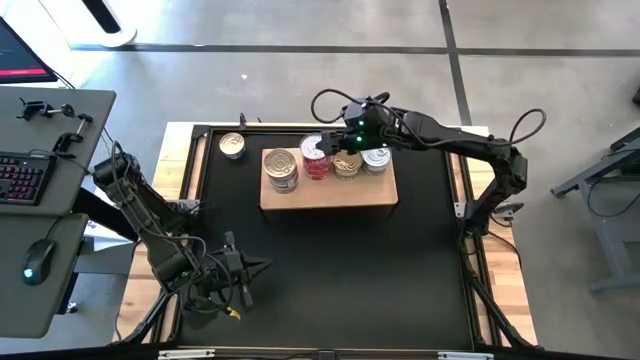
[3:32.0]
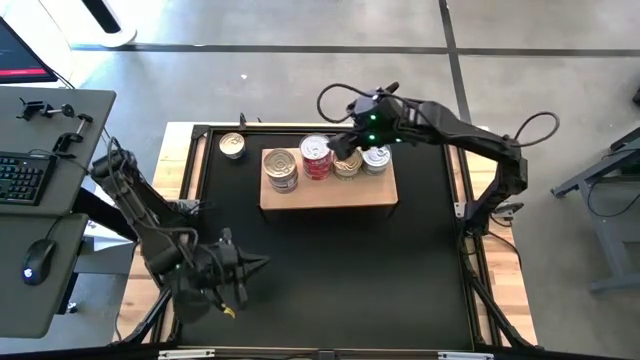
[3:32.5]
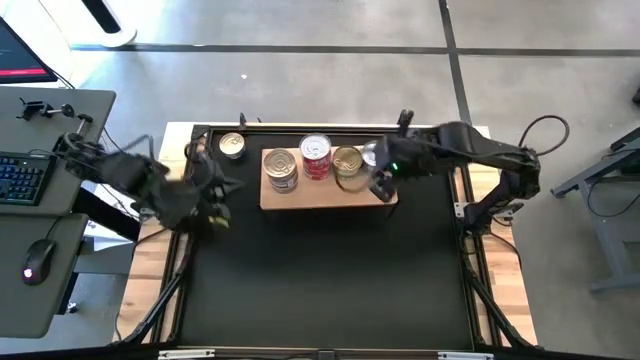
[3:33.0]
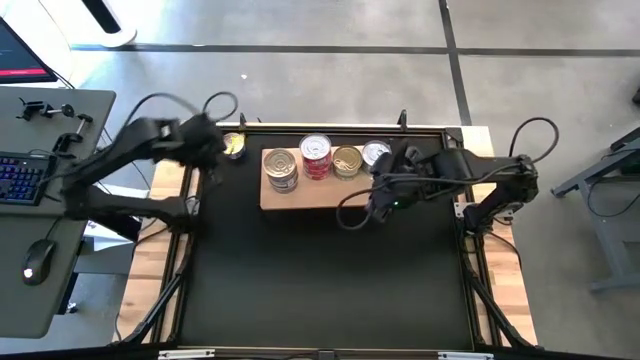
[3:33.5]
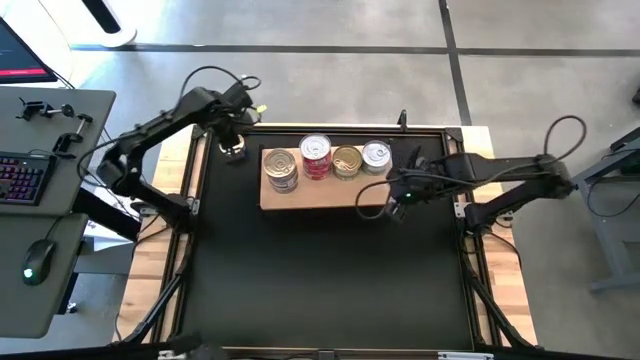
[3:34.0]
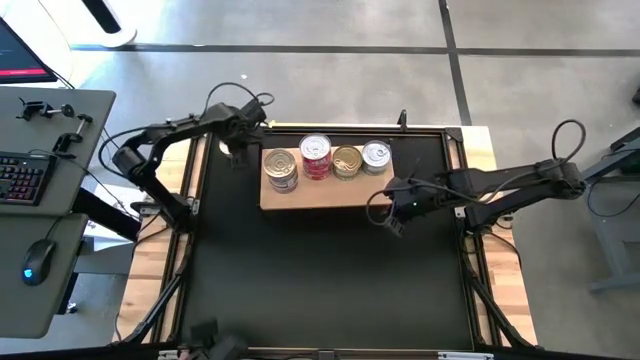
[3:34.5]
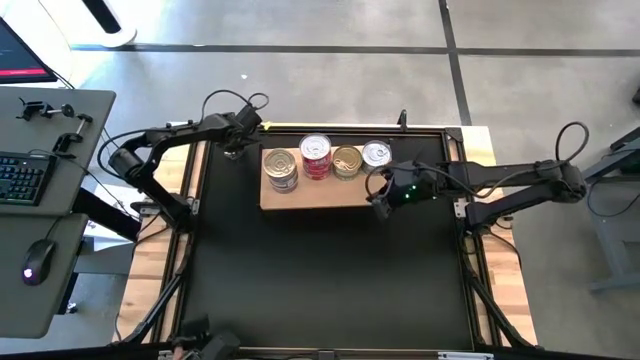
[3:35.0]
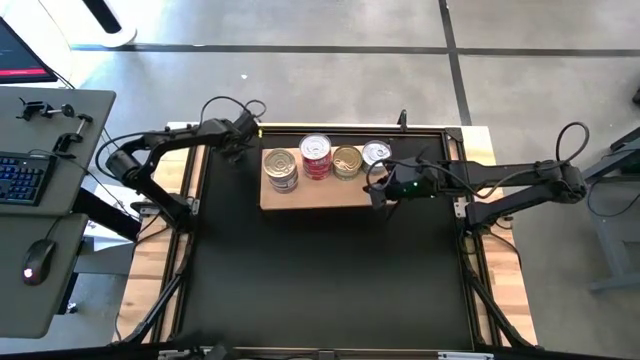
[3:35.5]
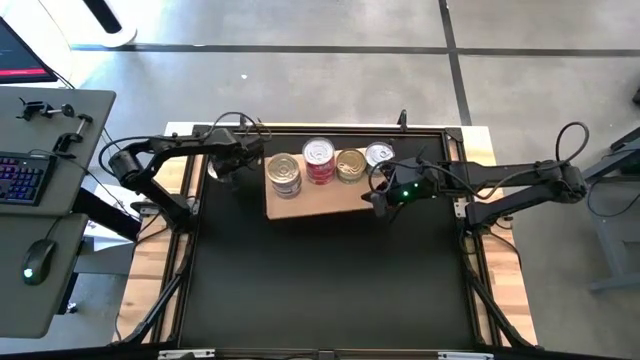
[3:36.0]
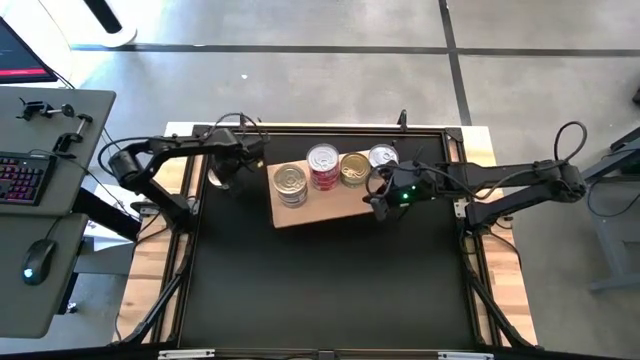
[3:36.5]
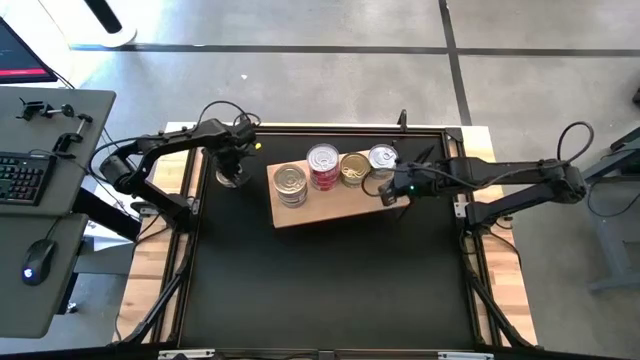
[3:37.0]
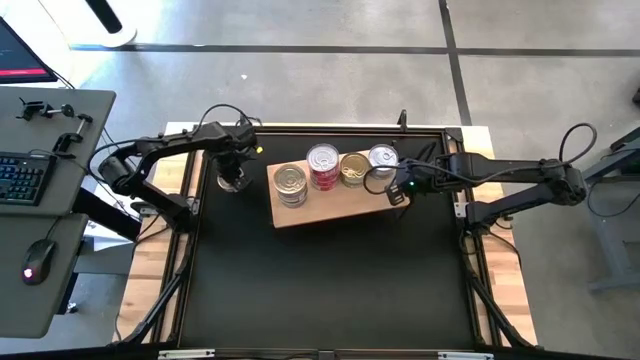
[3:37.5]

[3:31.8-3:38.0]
Task: Stack canned seafood by type on shelf
Move the blue and red tuna can to the center of the table

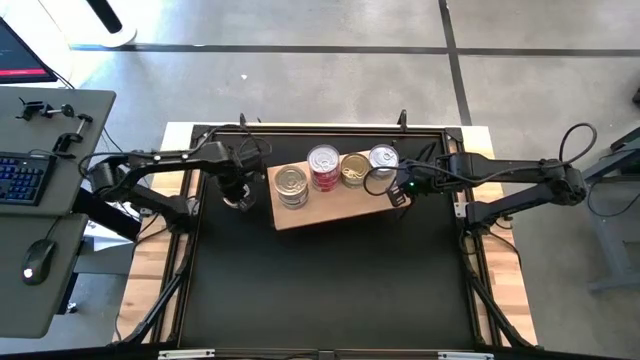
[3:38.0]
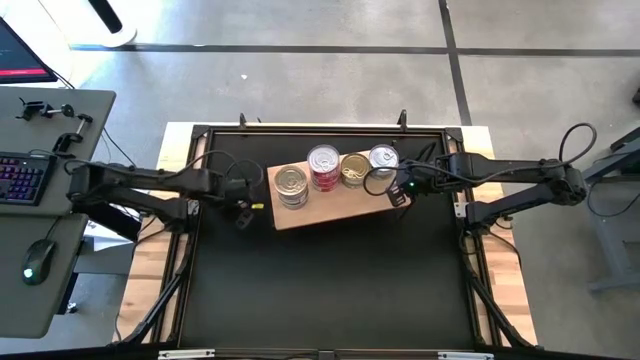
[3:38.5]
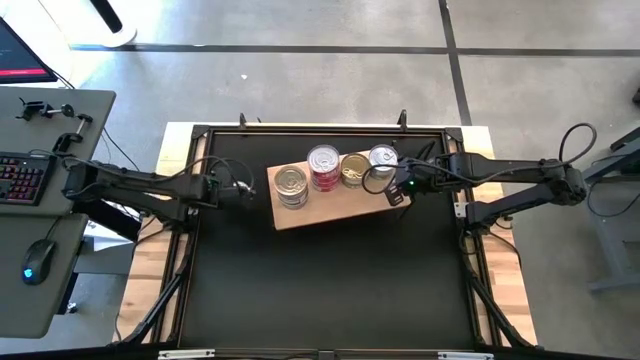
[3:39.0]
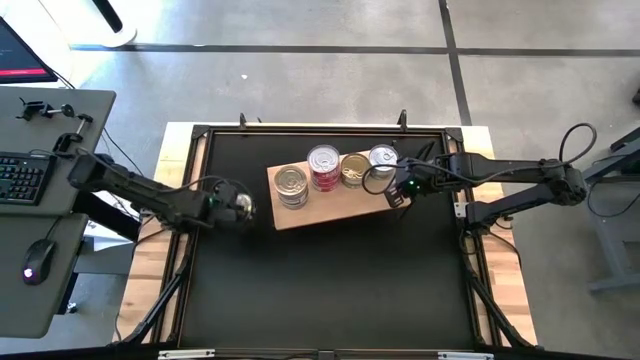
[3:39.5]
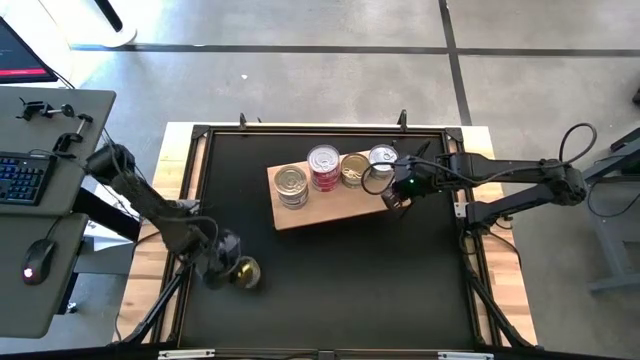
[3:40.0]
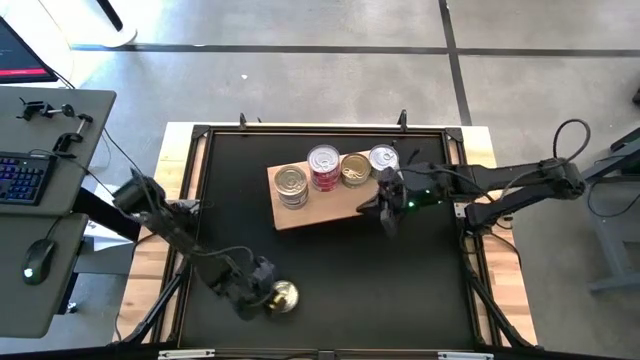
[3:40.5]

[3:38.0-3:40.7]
Move the blue and red tuna can to the center of the table

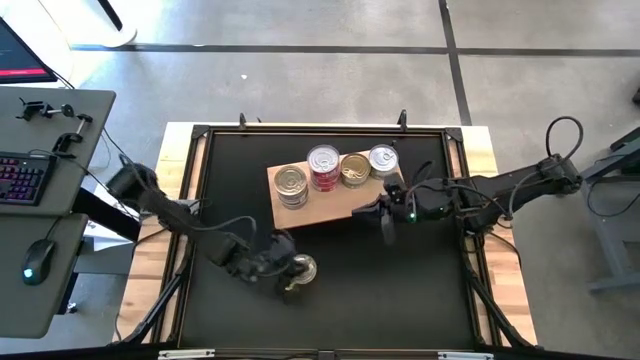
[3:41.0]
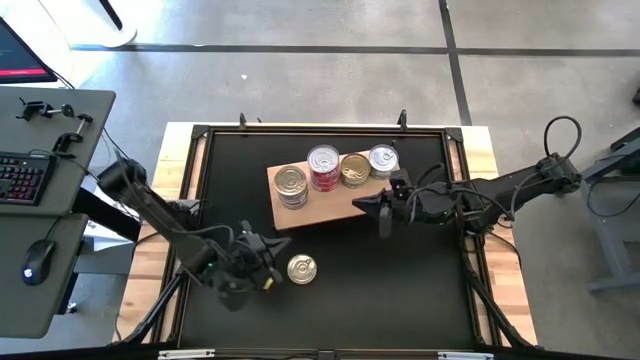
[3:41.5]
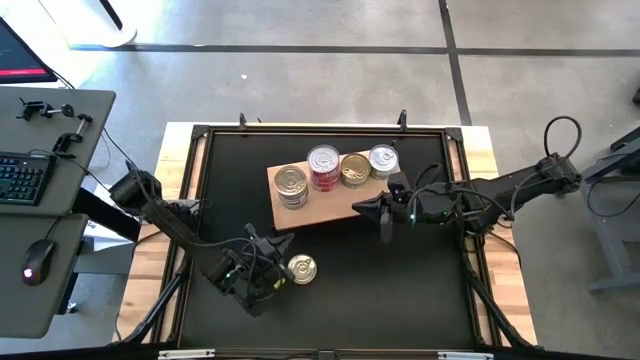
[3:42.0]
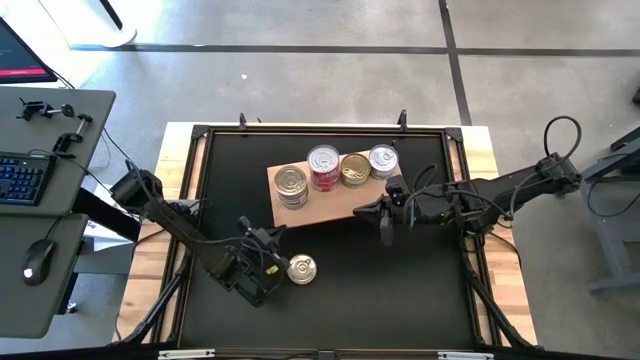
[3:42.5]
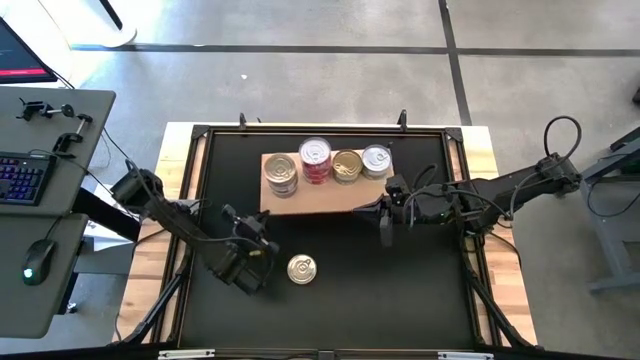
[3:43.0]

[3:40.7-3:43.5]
Adjust the shelf

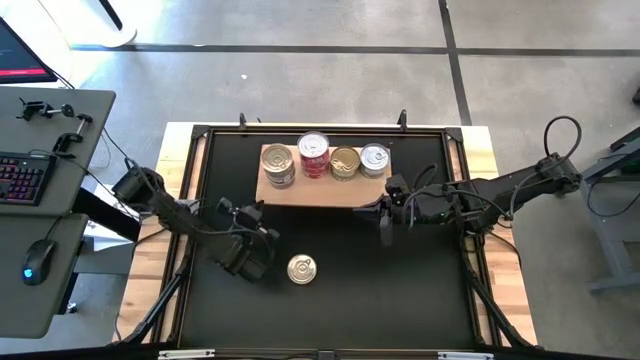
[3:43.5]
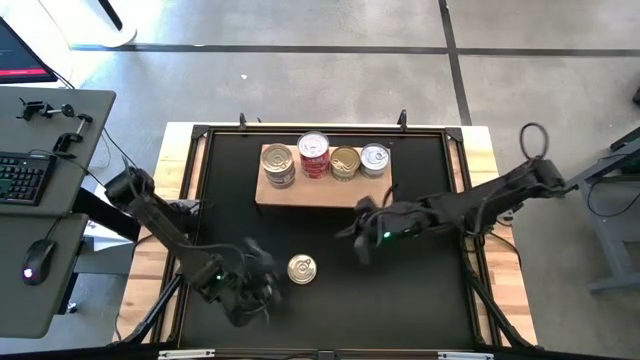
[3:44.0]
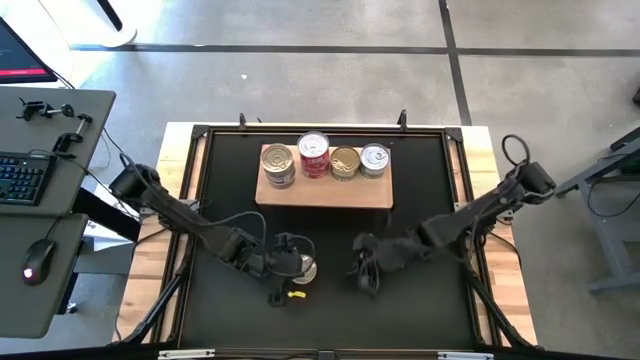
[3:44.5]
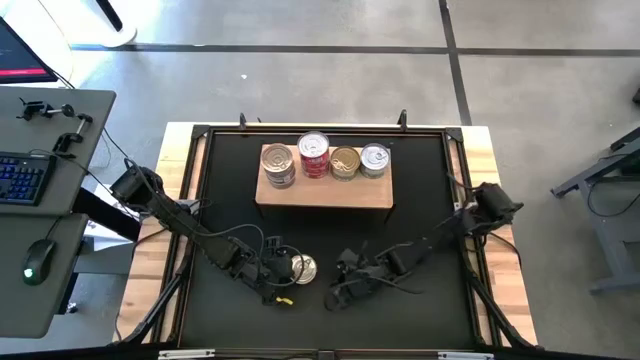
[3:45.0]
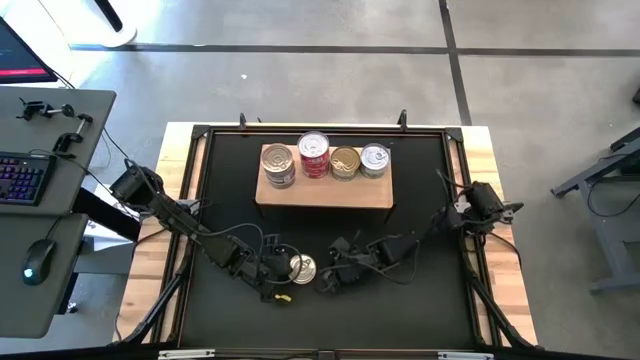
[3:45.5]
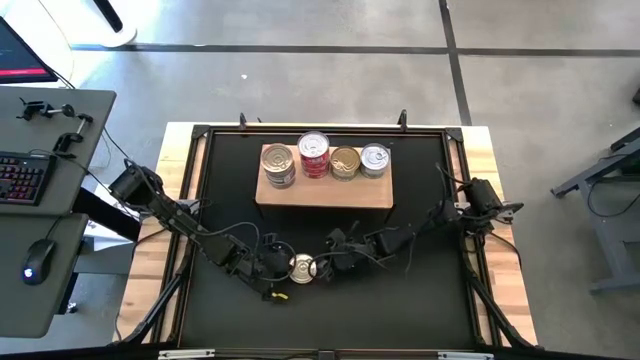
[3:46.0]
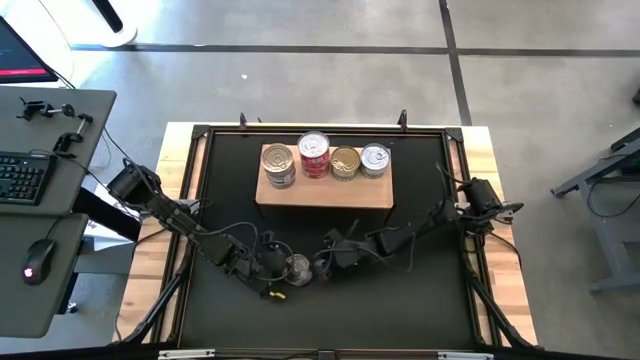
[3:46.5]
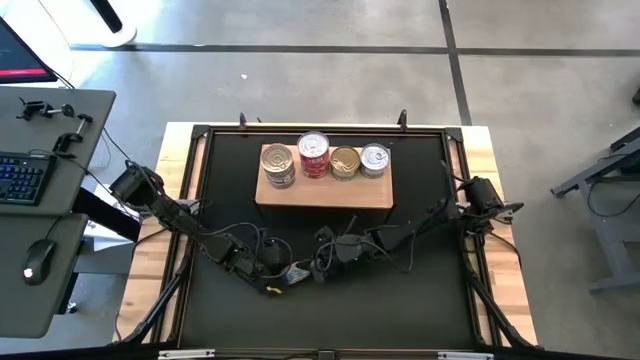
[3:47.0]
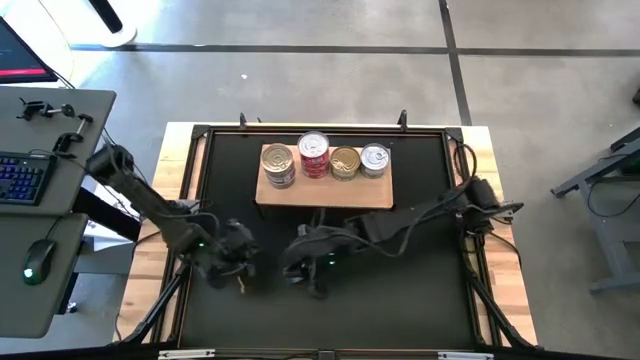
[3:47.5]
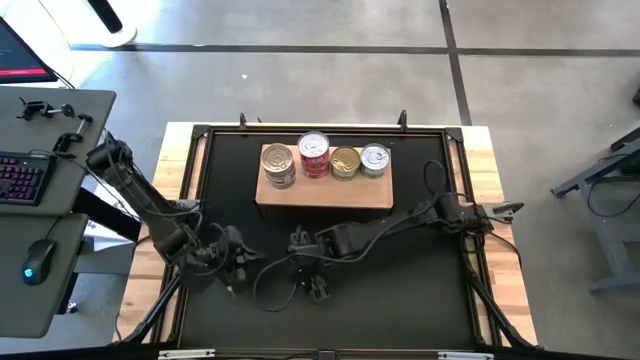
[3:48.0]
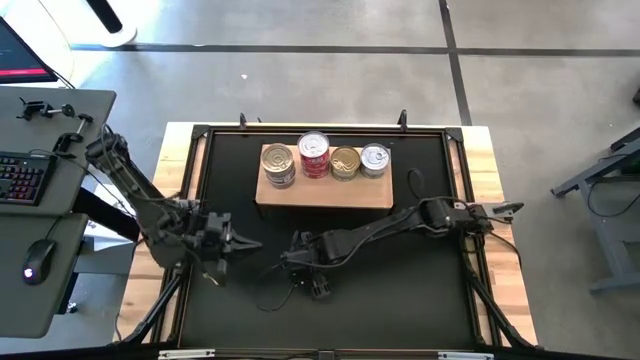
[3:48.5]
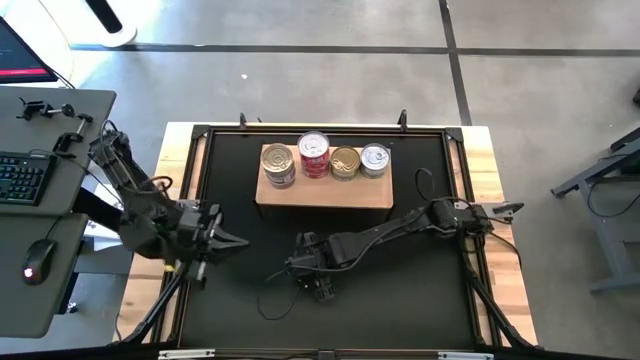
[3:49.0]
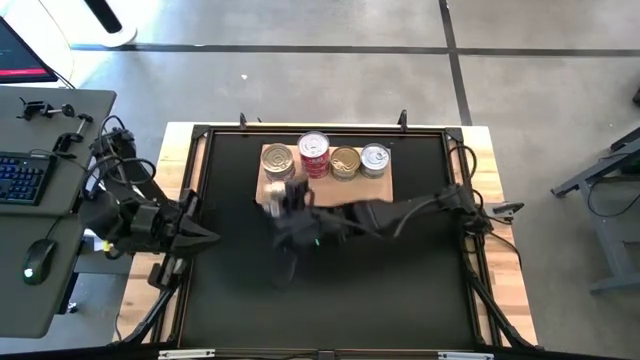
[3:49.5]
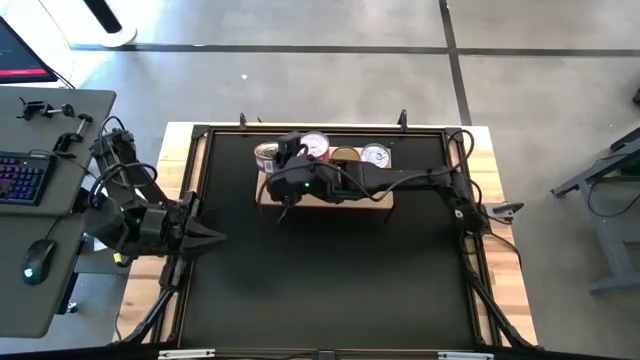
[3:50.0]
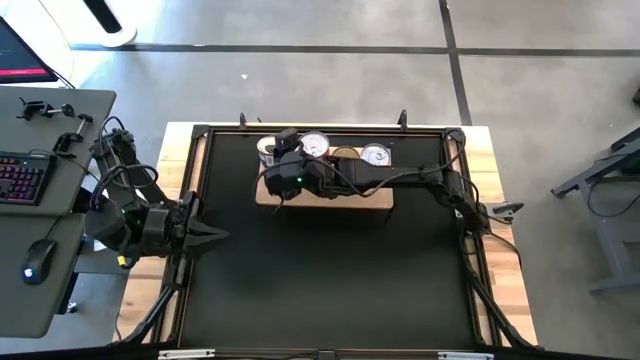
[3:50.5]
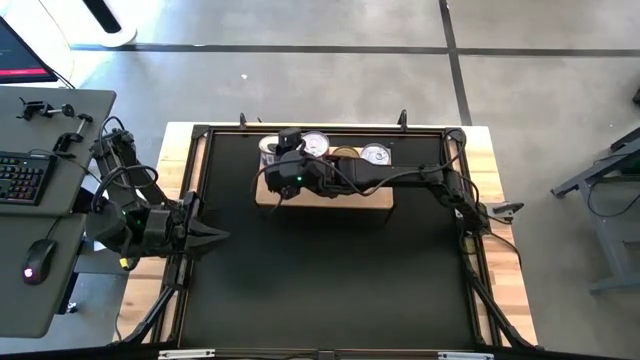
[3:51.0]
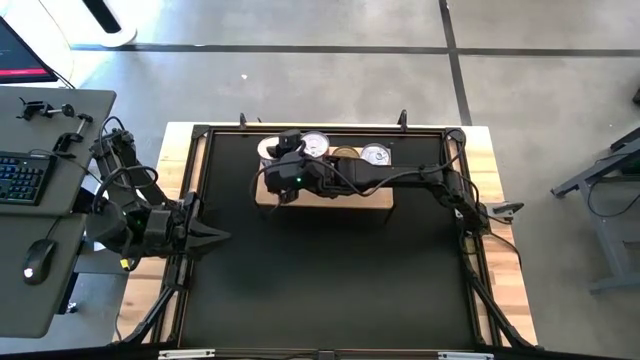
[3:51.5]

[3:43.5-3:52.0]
Stack the blue and red tuna can on top of the blue and red tuna cans on the shelf
